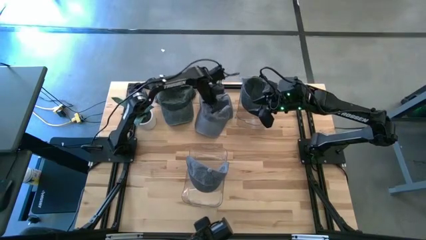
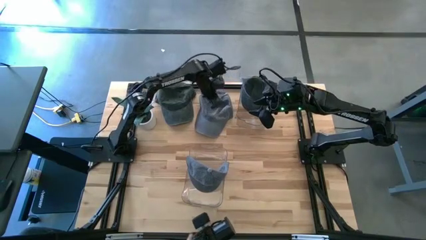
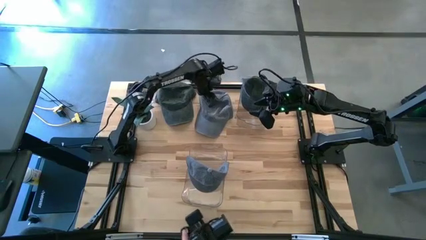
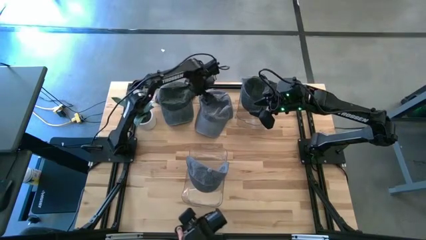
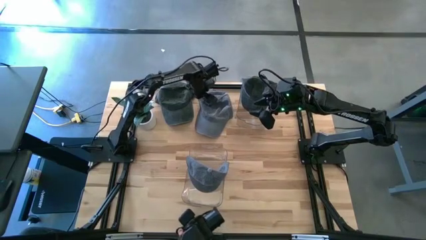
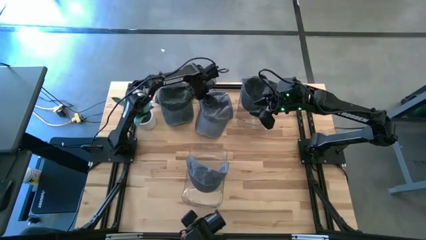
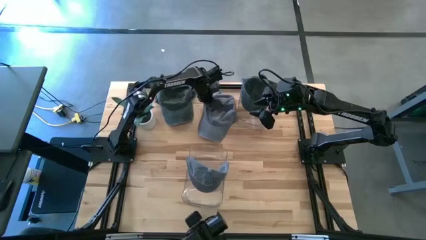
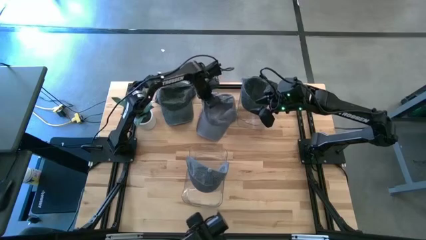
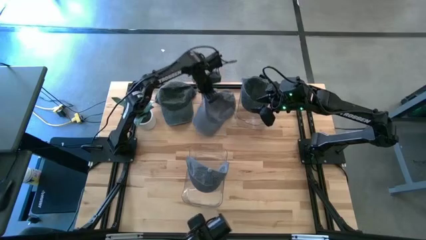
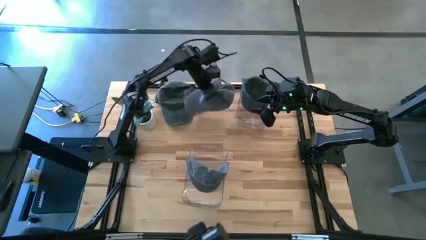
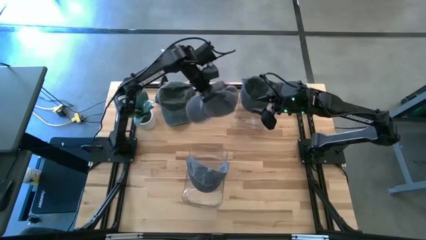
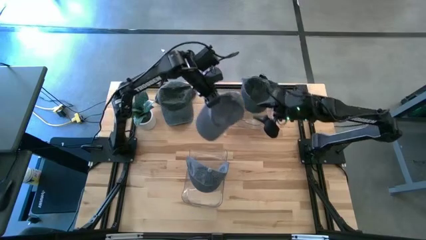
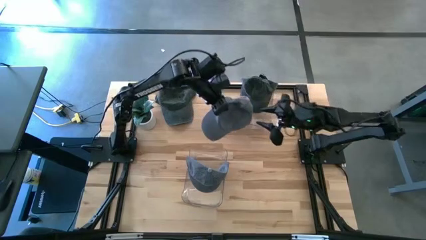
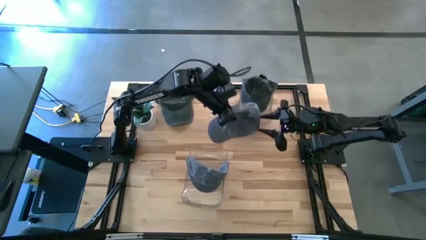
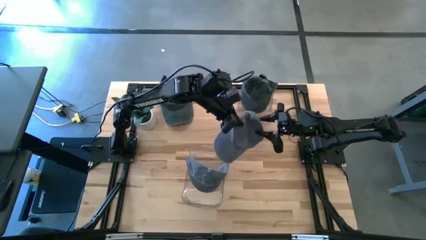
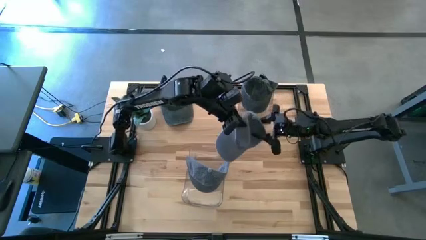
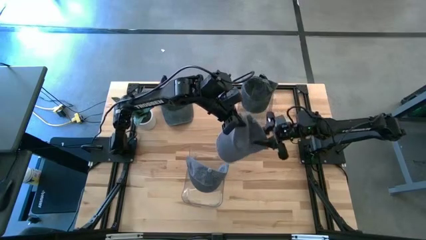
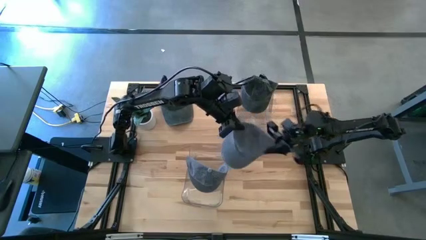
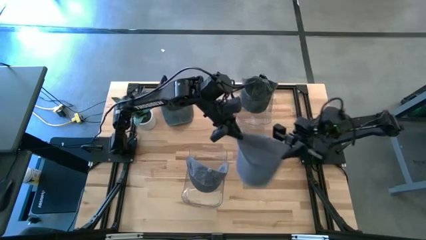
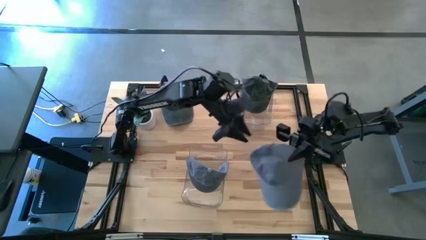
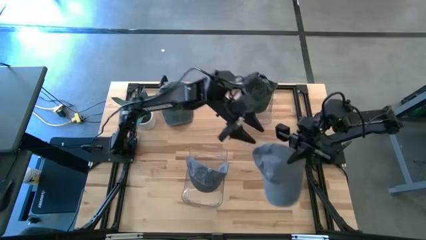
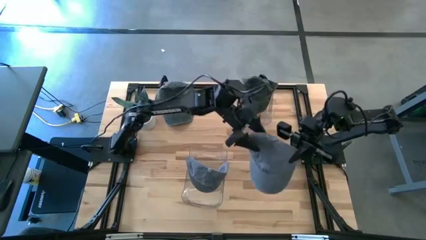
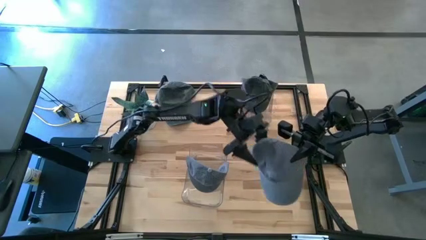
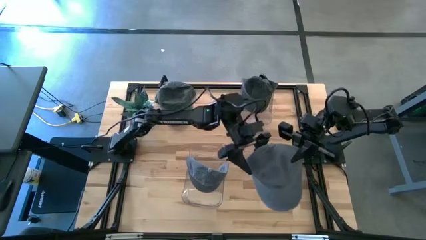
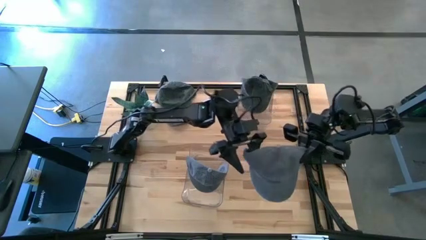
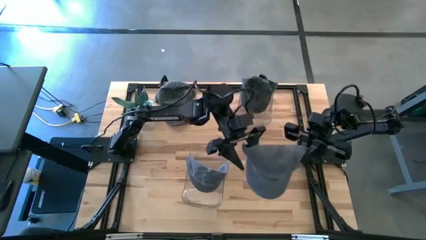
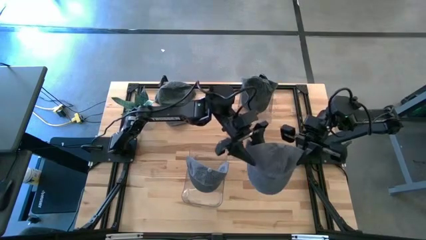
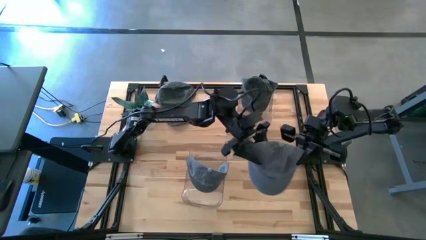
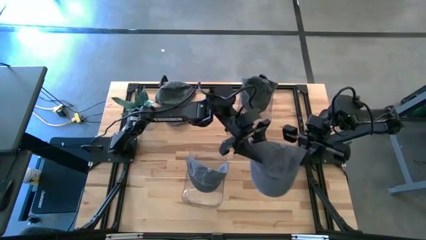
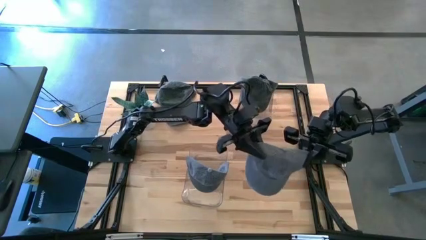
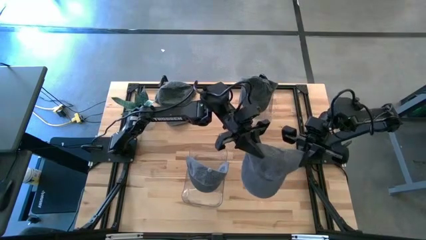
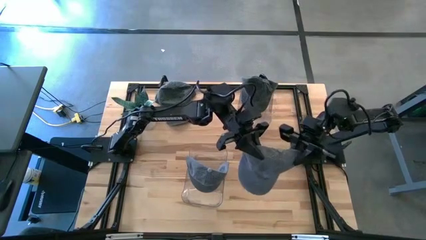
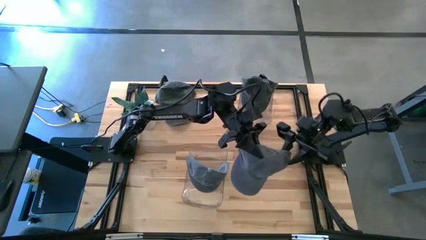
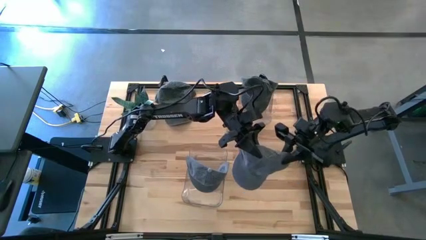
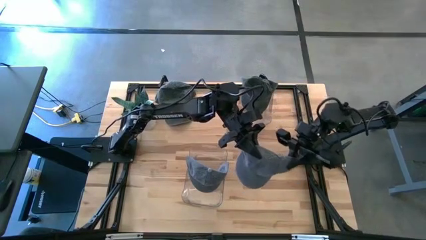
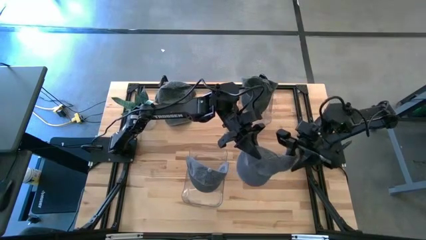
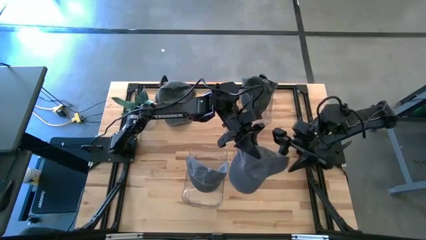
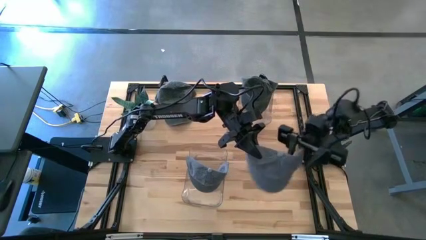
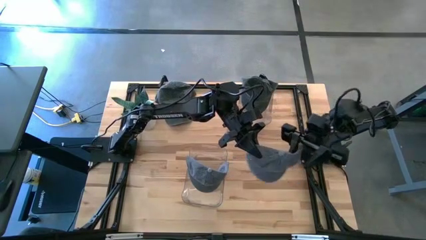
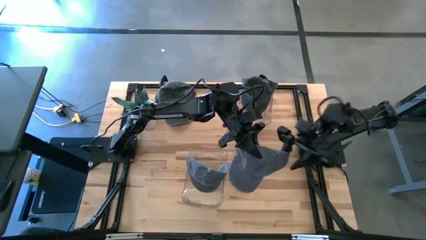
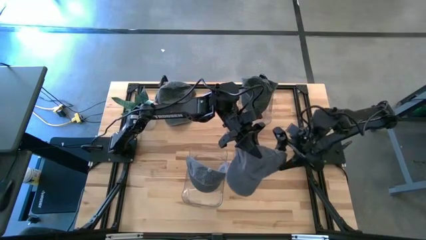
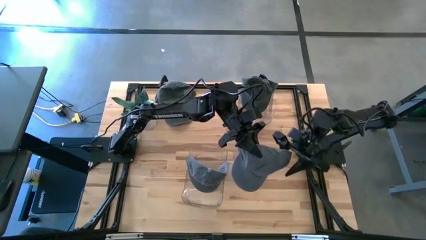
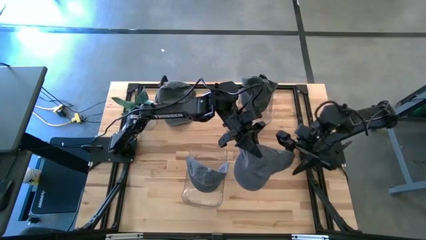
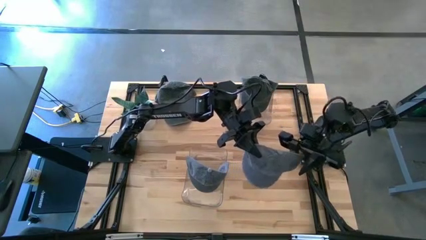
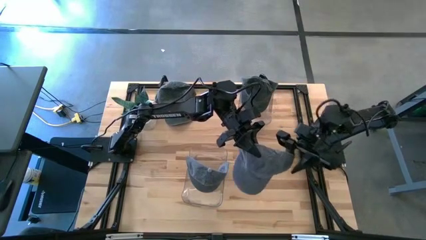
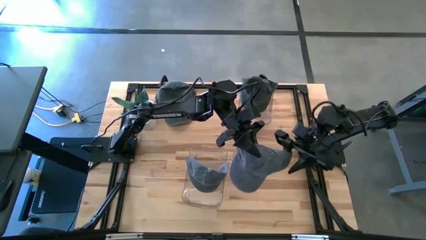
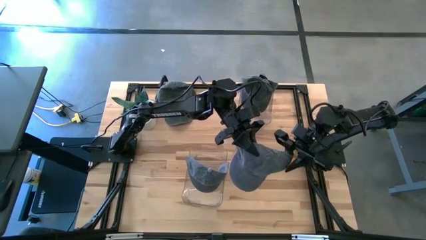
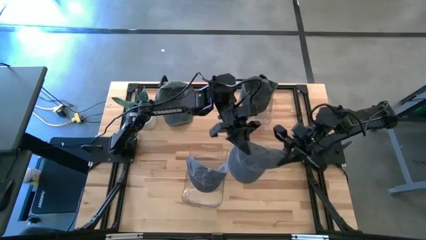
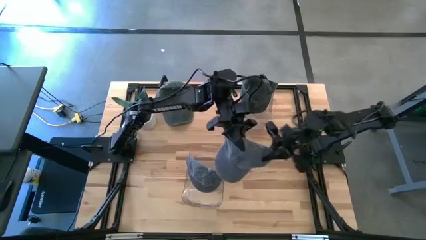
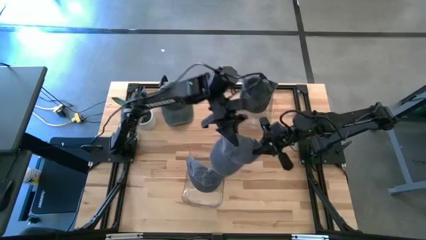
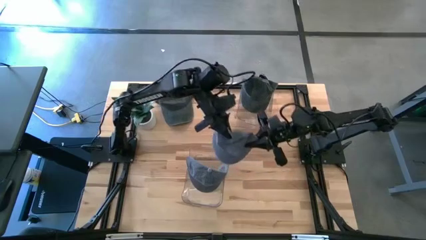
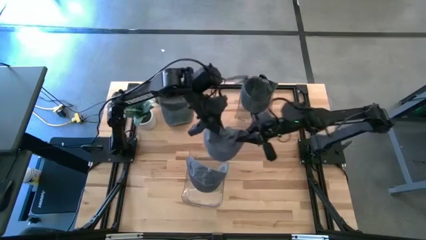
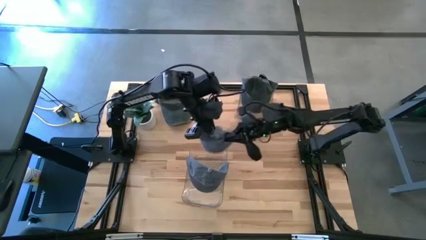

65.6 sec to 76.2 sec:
Task: Pick & Place hat
Put the gray cap into the bottom transparent bin
